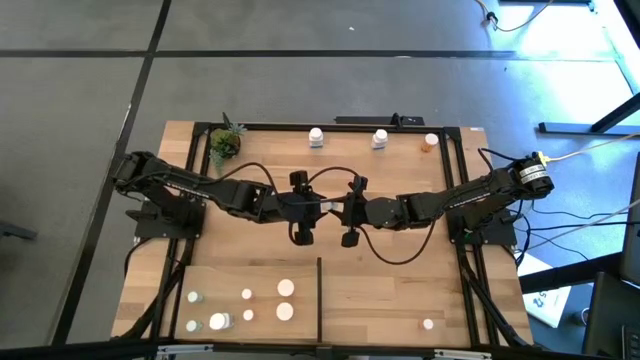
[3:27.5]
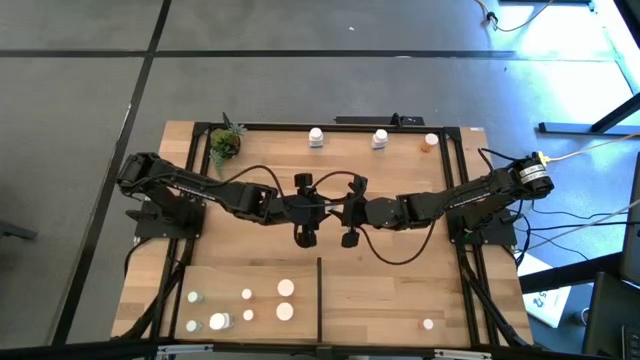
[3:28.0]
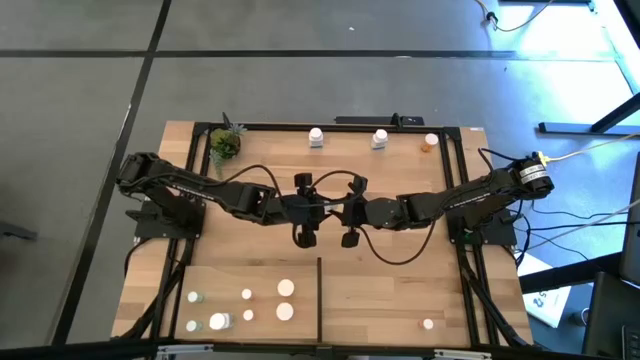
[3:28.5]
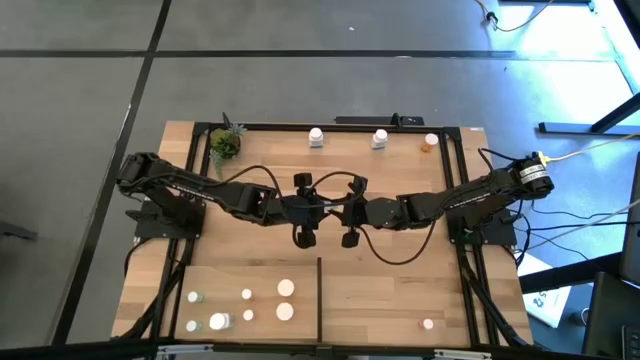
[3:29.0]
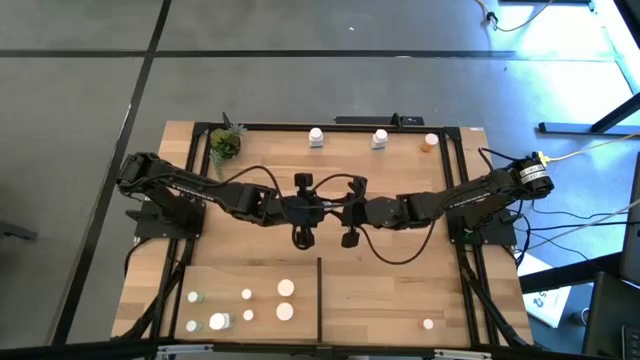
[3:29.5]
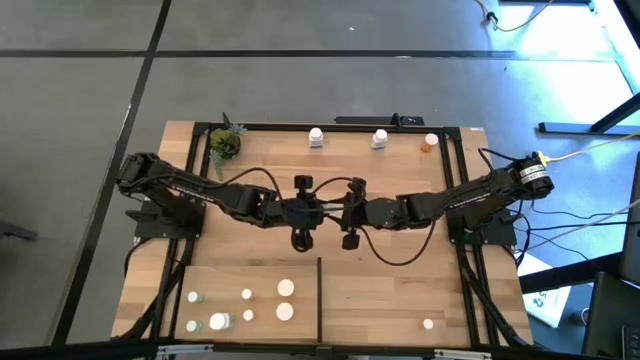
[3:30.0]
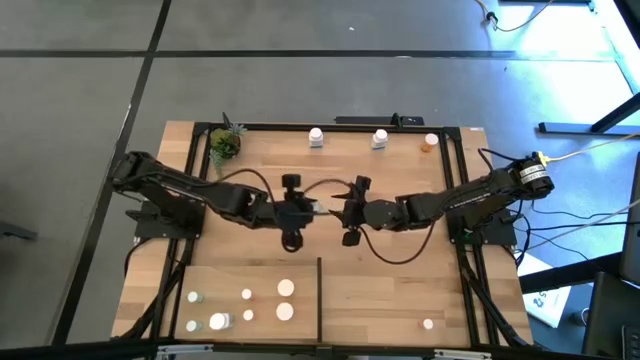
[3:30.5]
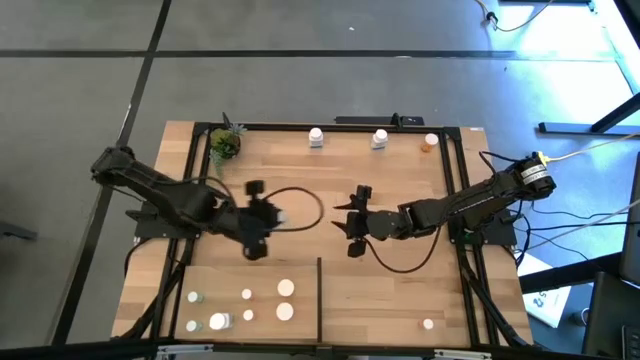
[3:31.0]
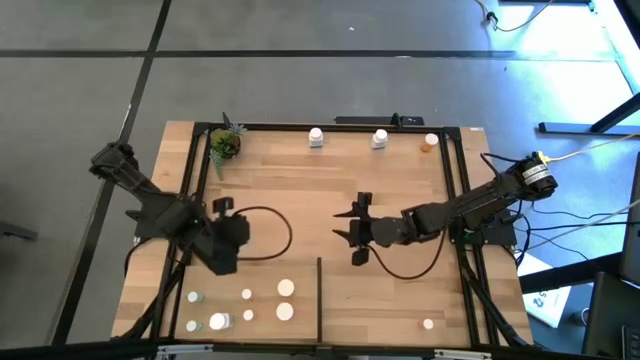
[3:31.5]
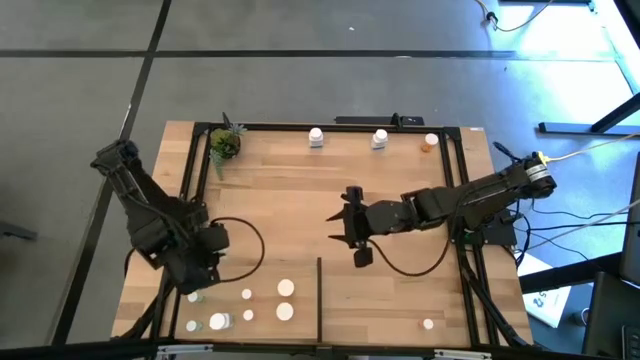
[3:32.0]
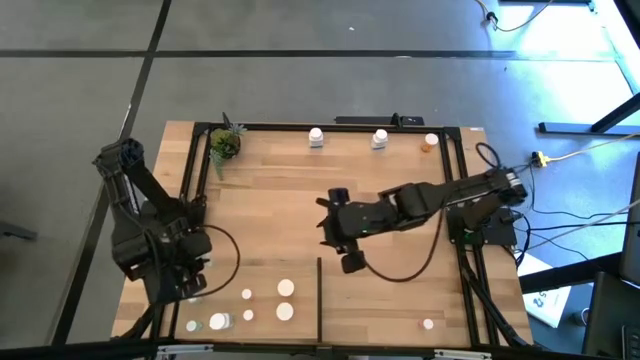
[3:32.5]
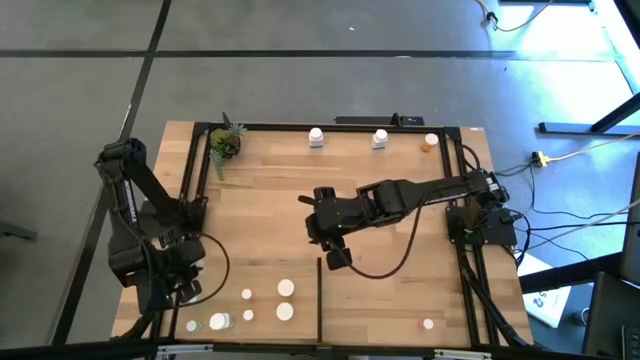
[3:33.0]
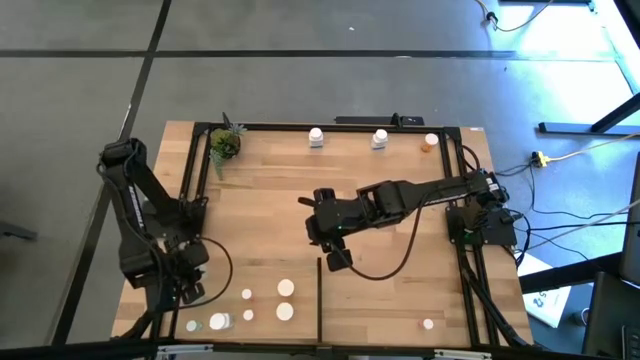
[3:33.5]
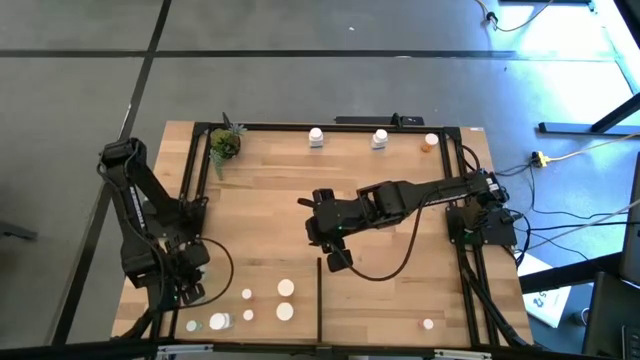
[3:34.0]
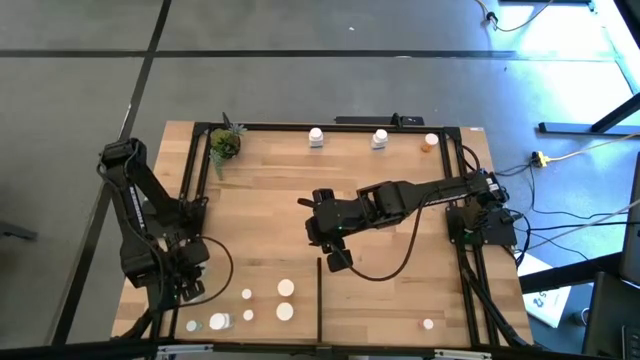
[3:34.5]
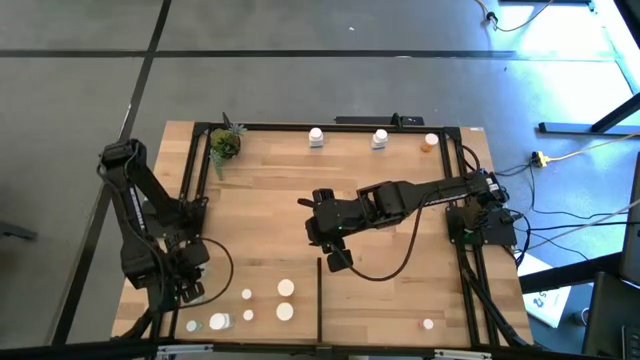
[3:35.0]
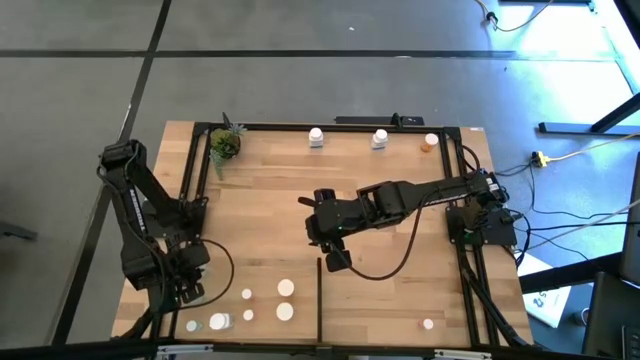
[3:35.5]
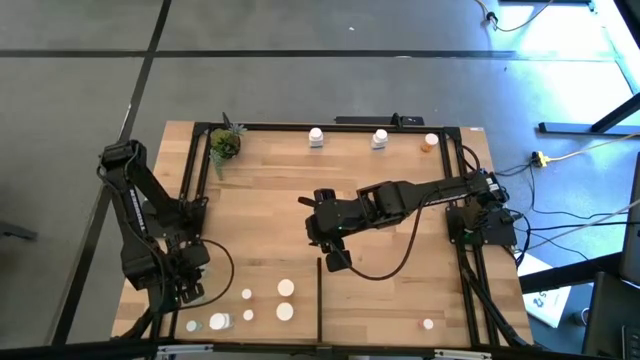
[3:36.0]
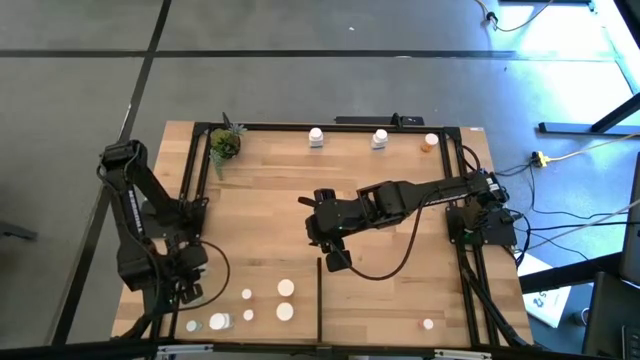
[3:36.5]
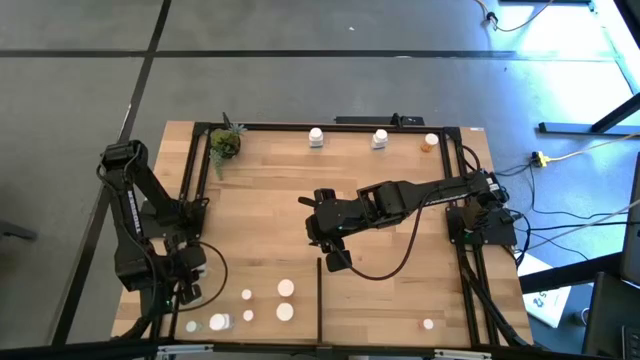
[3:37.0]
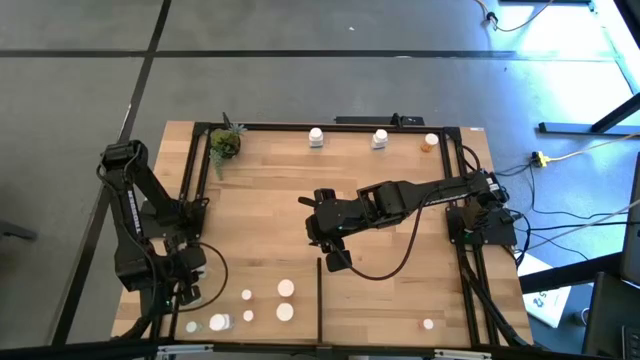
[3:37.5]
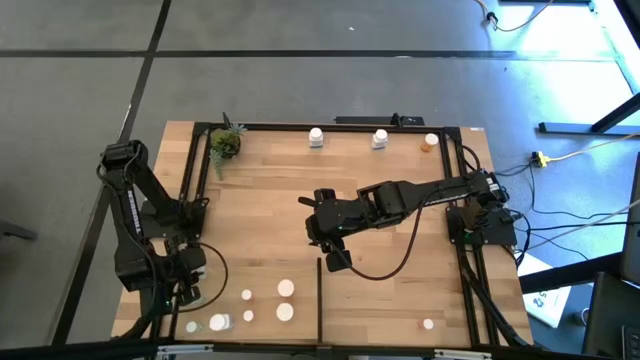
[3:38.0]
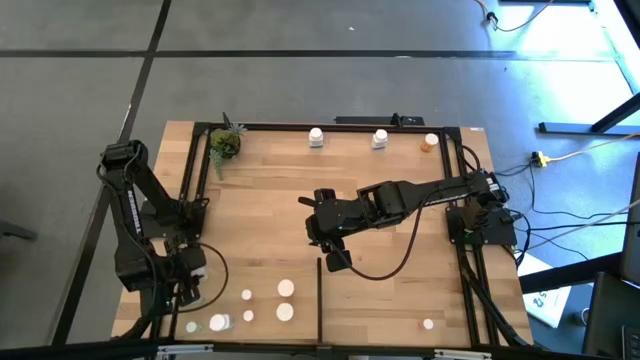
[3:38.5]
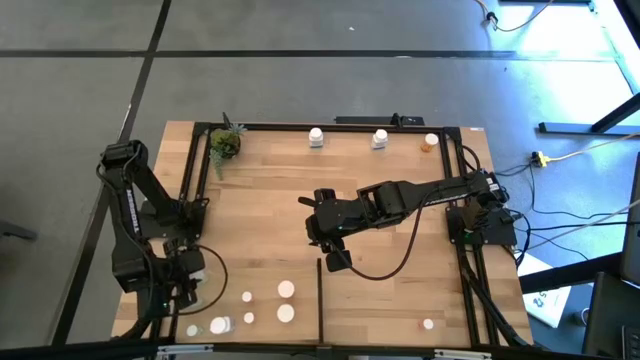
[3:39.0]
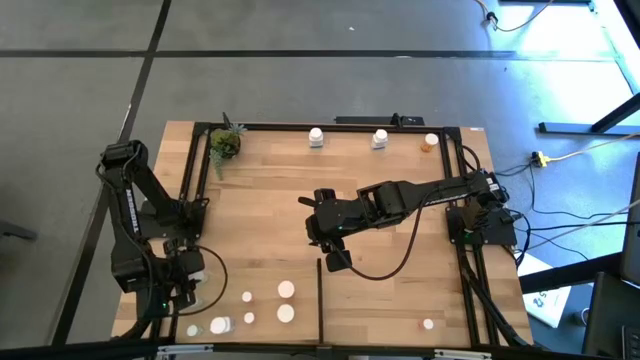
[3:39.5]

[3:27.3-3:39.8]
Task: Pick and place medicine bottles onto shelf by color
Put the green pill bottle on the shelf aligned with the other green pill bottle

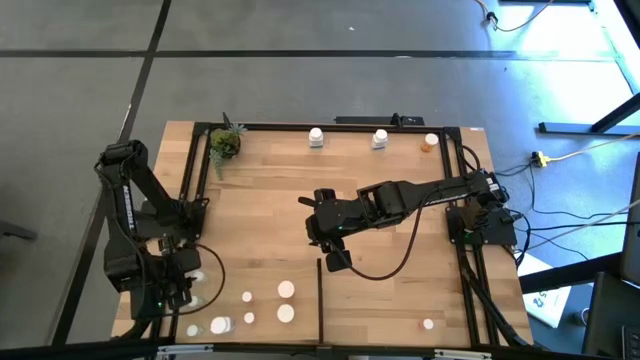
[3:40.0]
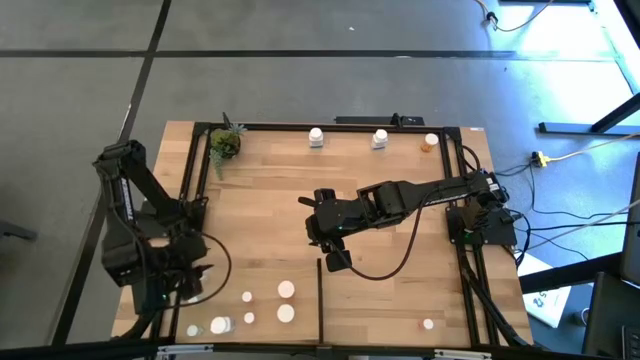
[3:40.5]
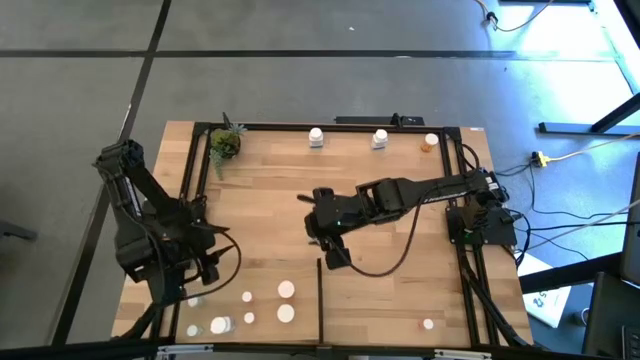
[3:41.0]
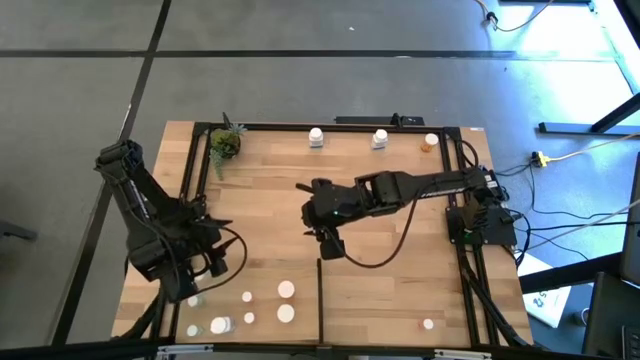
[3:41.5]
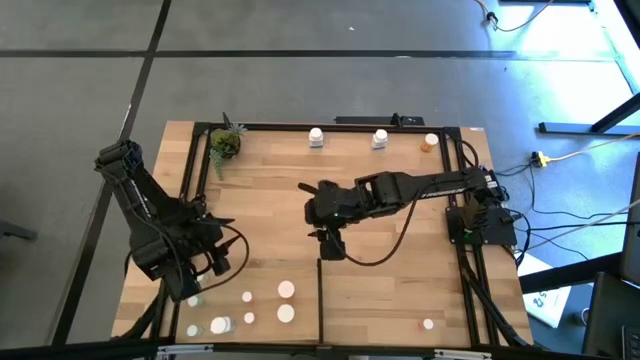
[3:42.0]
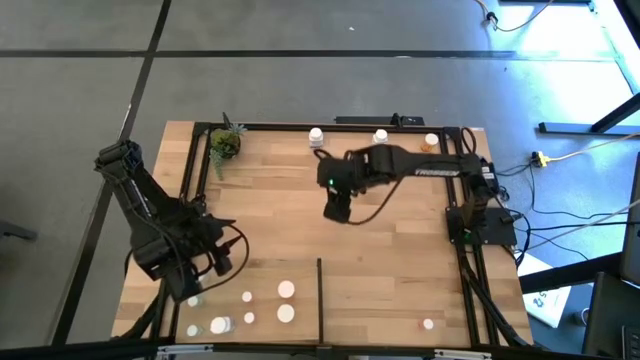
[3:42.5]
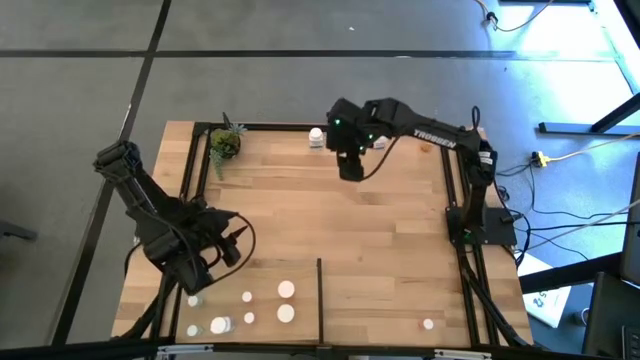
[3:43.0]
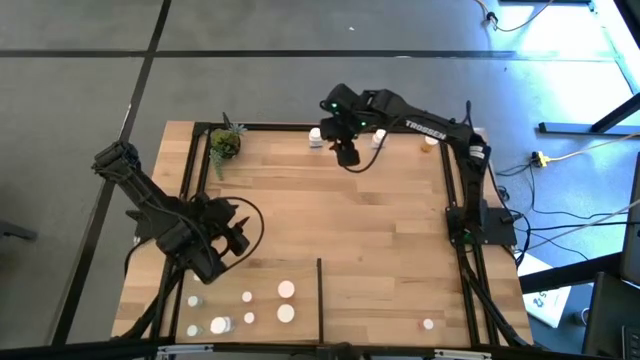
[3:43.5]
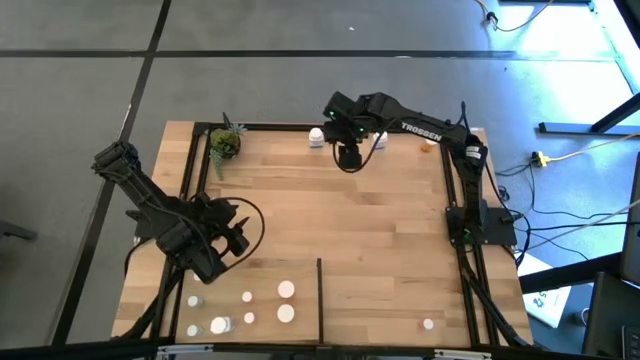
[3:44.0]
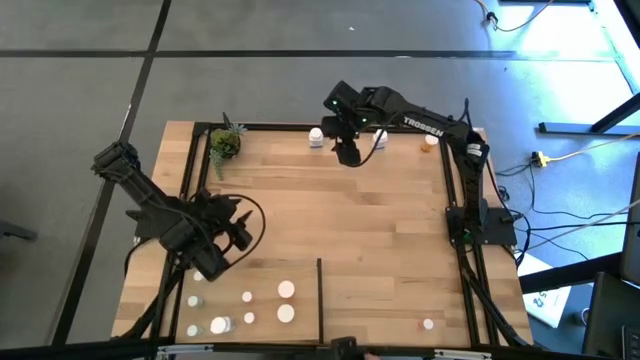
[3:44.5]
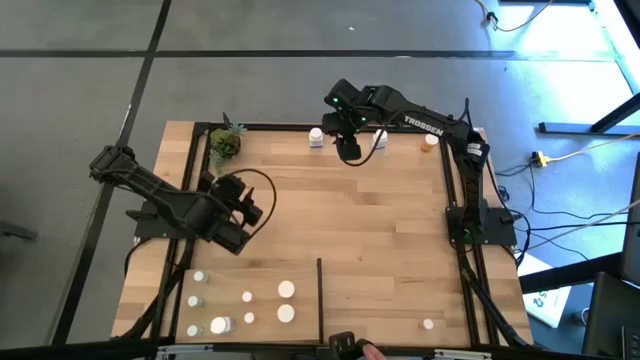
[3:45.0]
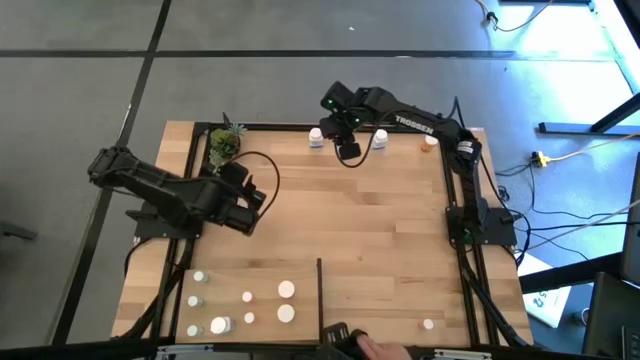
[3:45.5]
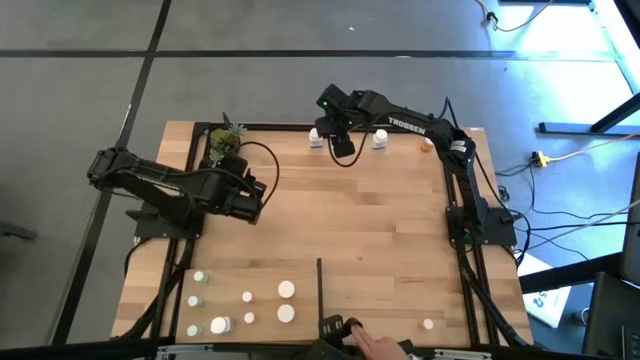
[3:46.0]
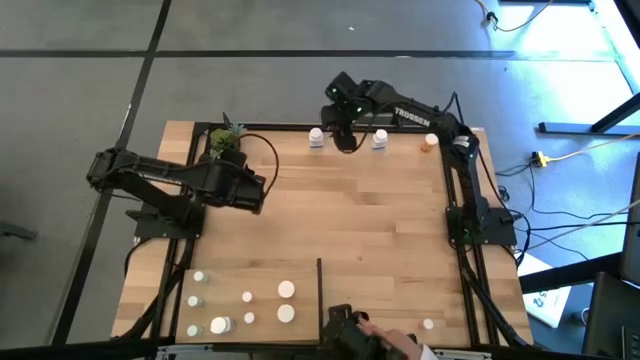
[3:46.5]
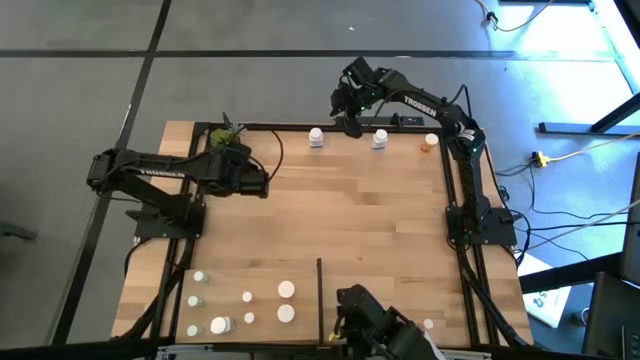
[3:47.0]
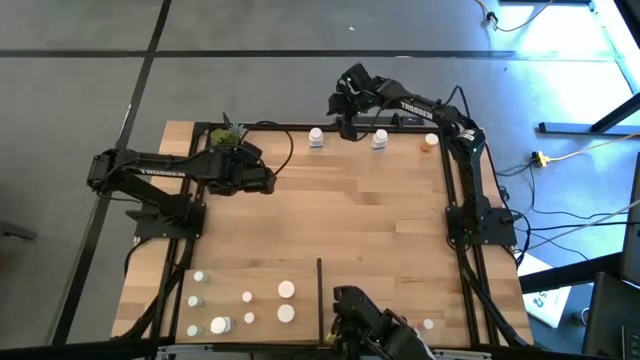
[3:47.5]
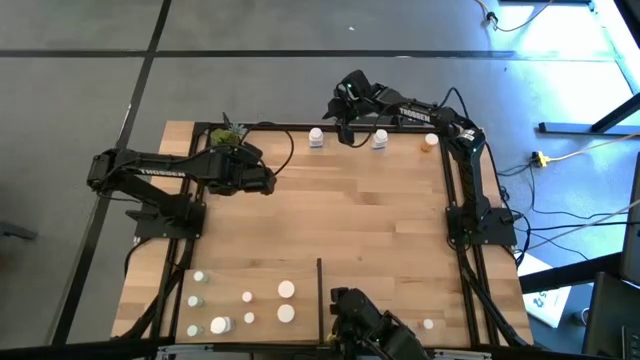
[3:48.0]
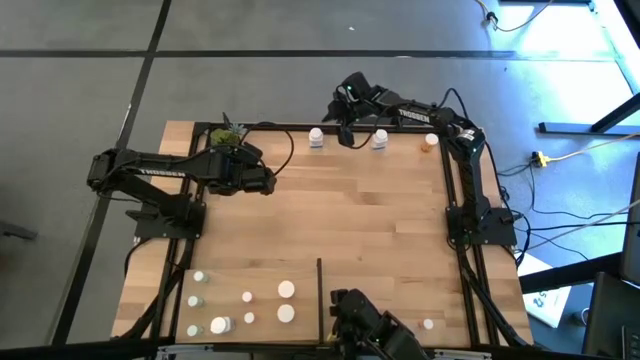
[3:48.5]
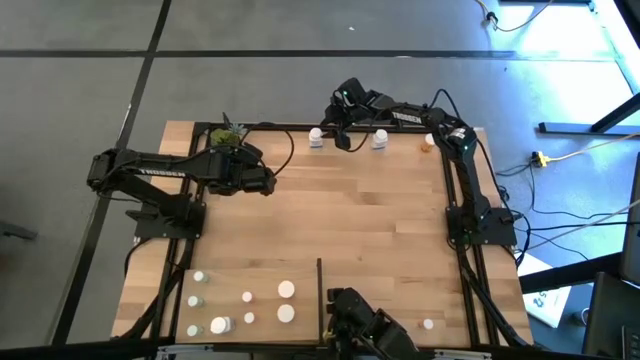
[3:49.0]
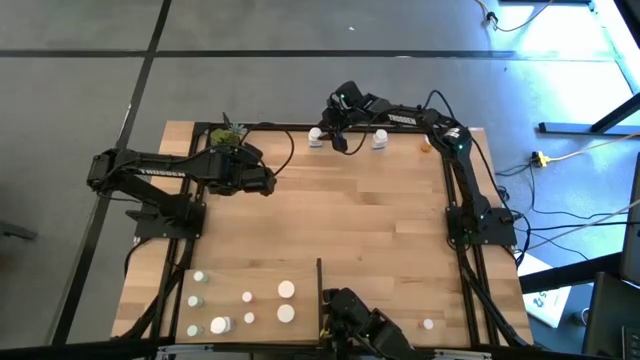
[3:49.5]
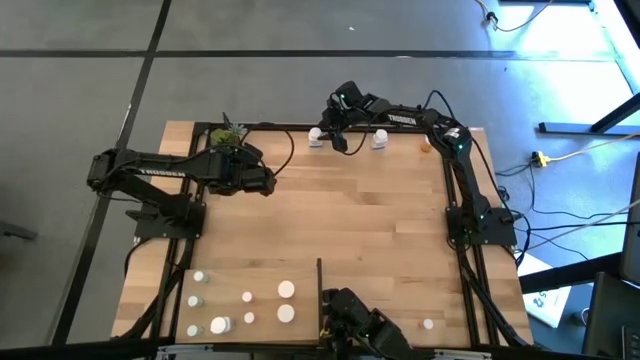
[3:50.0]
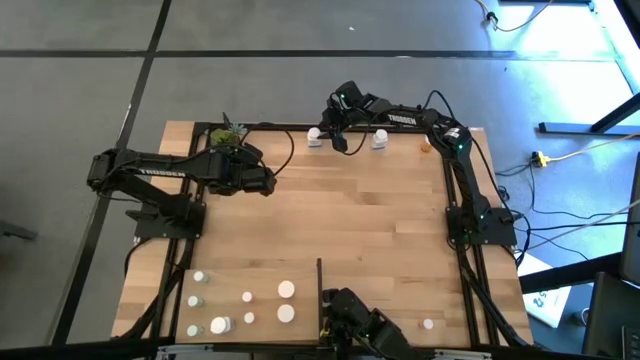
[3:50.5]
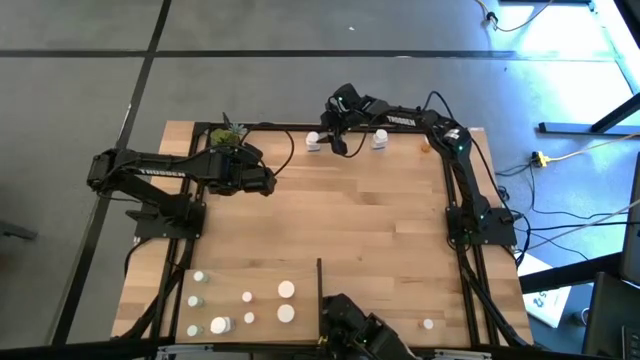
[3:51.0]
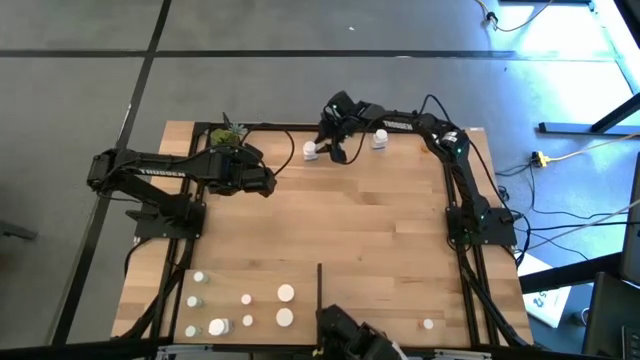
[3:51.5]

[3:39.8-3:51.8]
Put the left white pill bottle on the shelf aligned with the other white pill bottle
